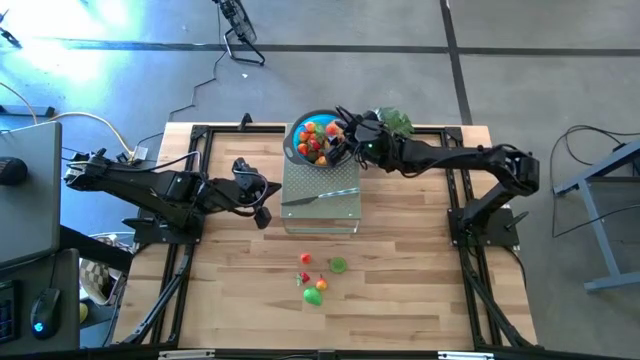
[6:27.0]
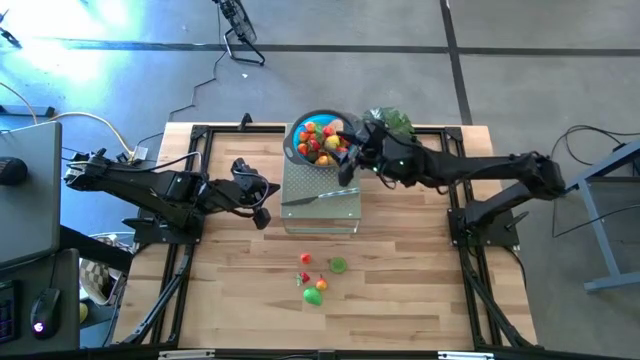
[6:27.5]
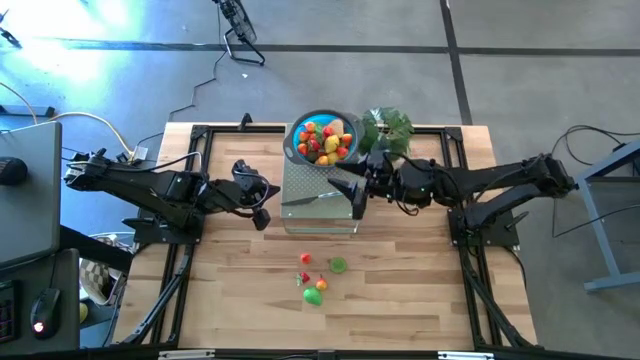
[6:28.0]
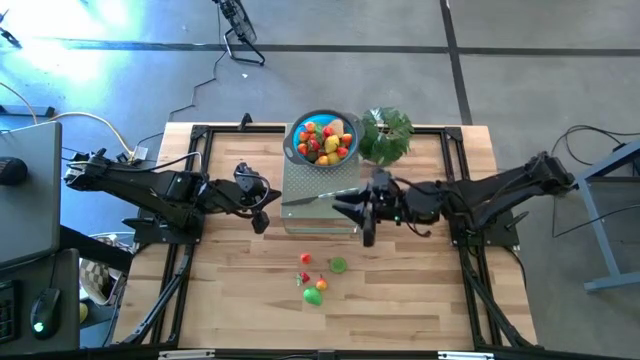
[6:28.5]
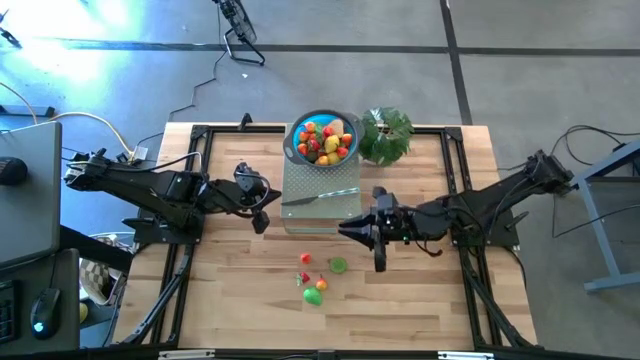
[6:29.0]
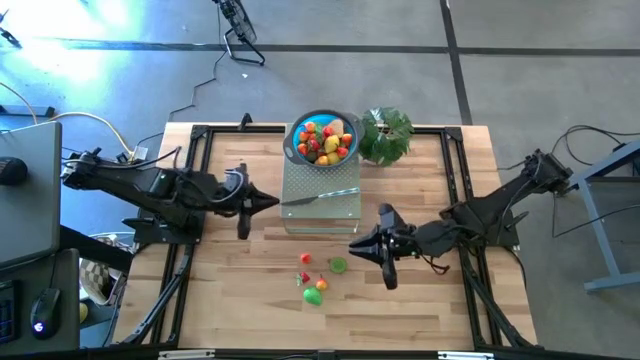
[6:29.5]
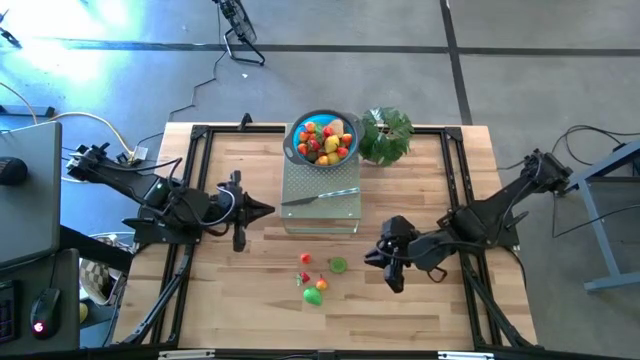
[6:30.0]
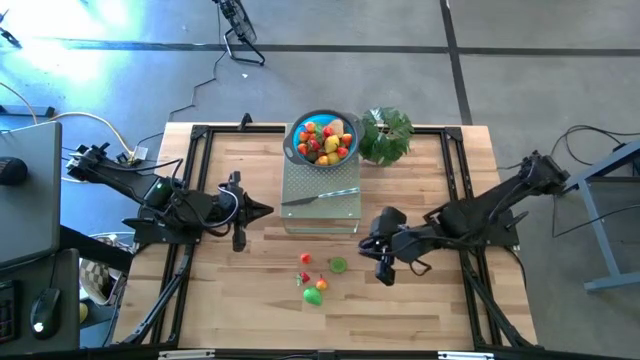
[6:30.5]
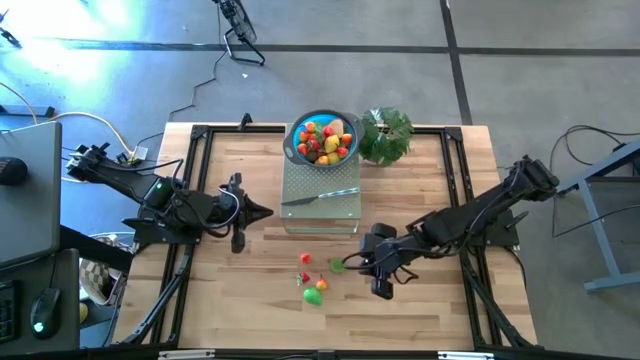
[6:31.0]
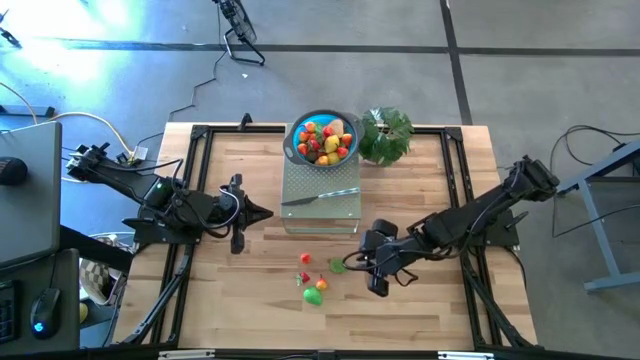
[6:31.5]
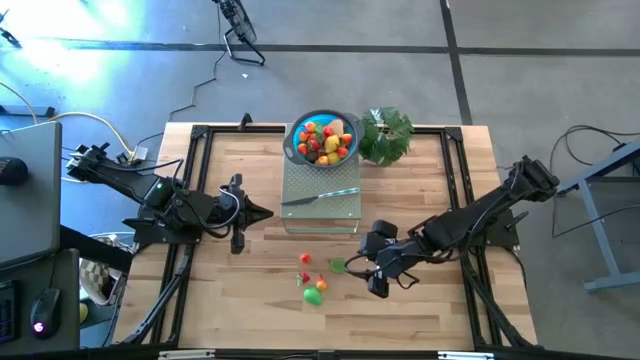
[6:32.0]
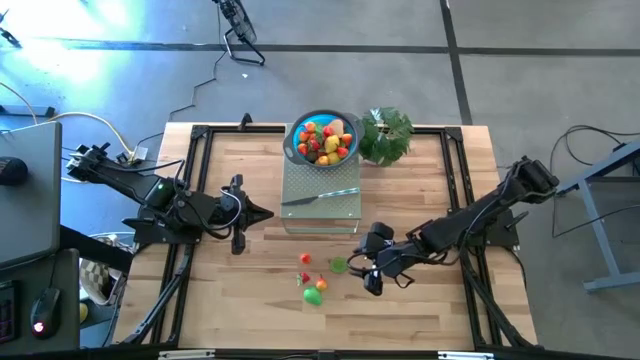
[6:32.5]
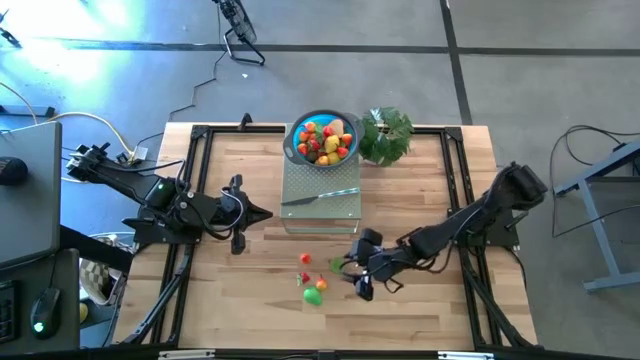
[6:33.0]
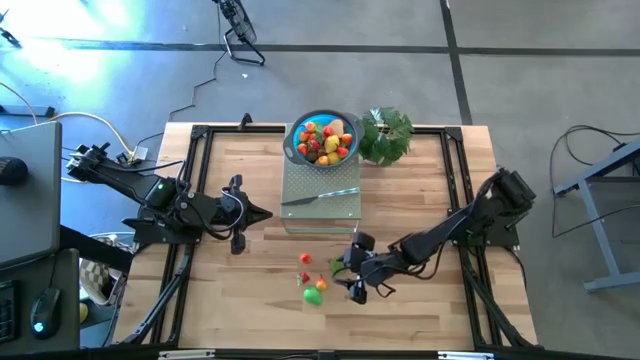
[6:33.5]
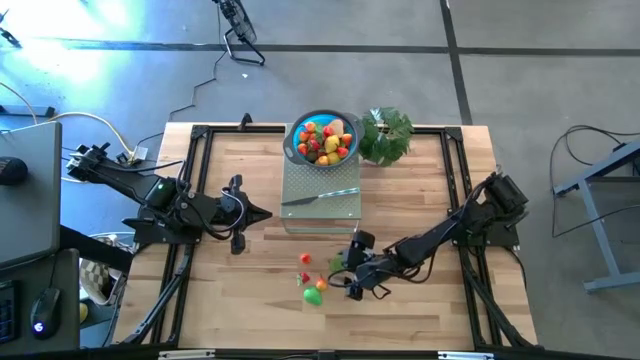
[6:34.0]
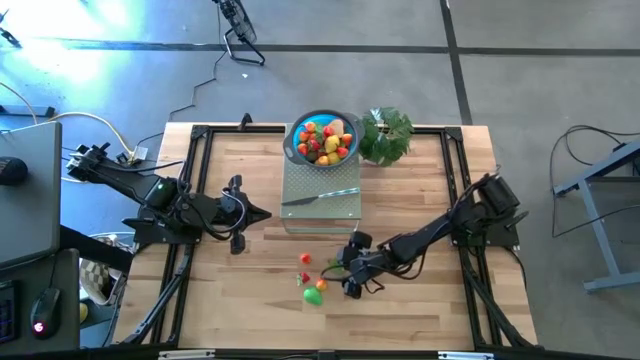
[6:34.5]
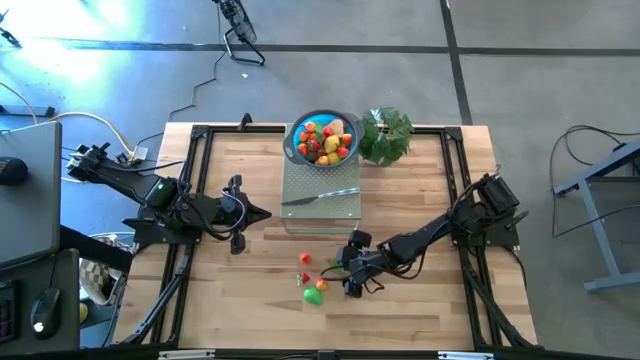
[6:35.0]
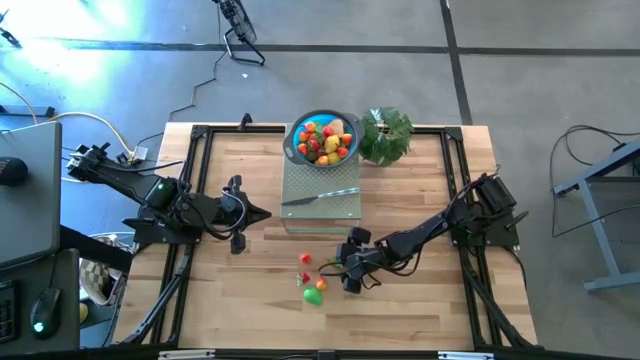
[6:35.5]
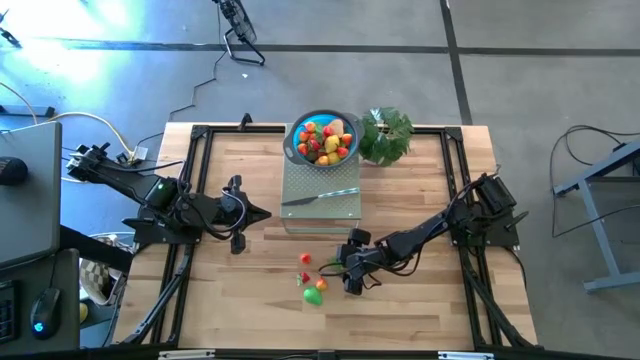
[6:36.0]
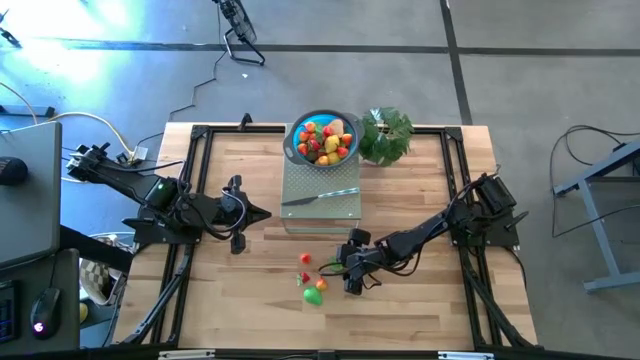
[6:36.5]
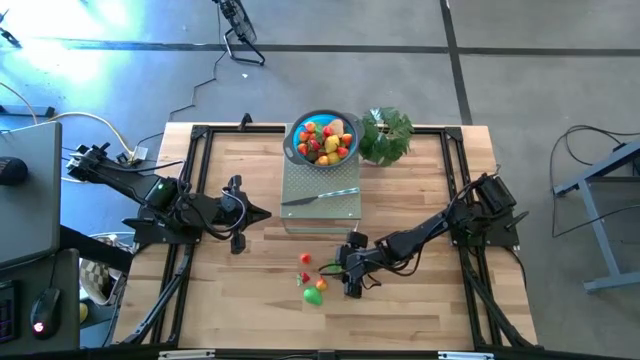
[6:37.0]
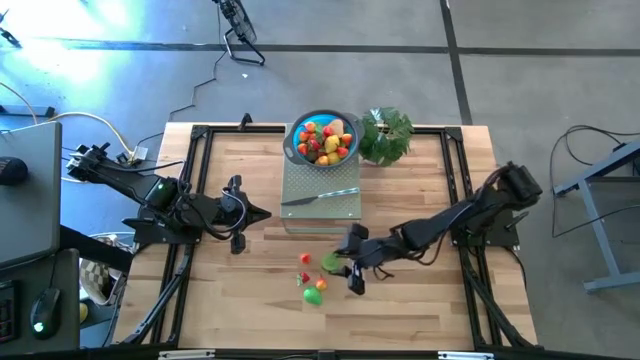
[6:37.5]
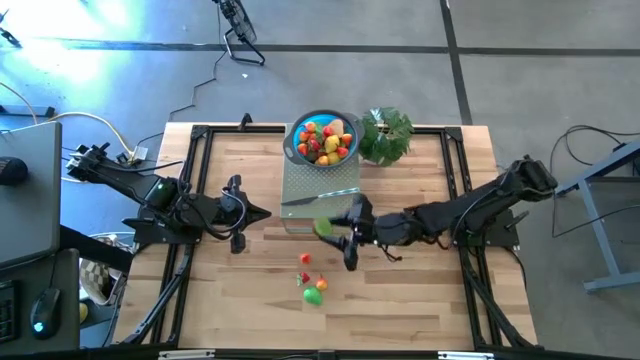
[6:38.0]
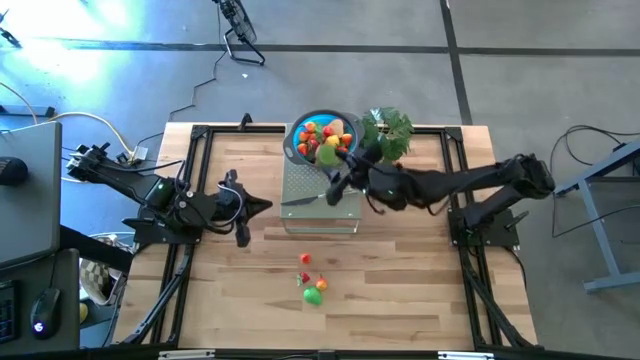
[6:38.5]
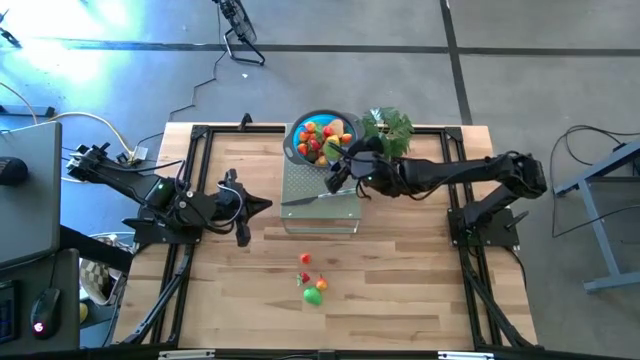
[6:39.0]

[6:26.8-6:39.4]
Task: Pick & Place Fruit
Put the brown kiwi in the blue bowl on the shelf

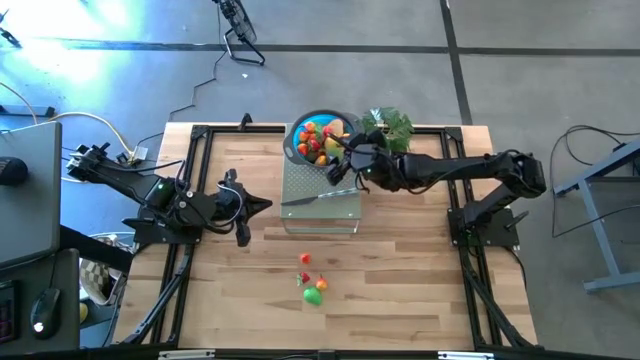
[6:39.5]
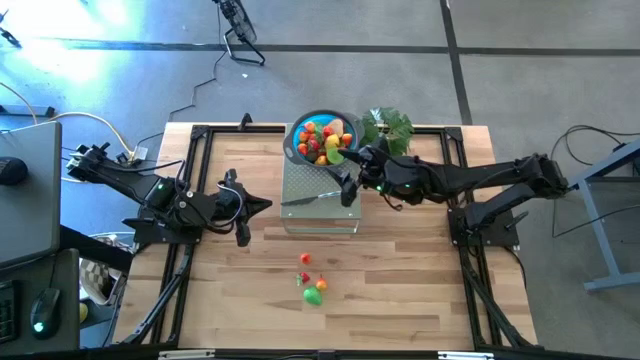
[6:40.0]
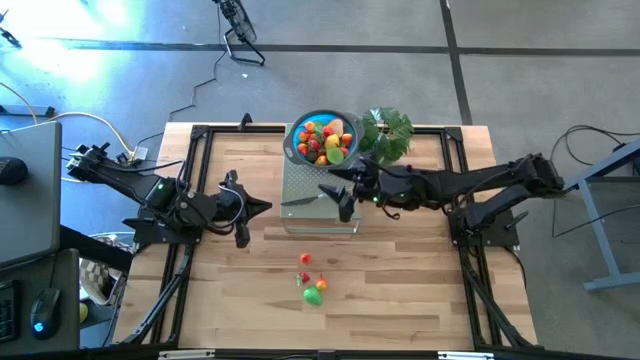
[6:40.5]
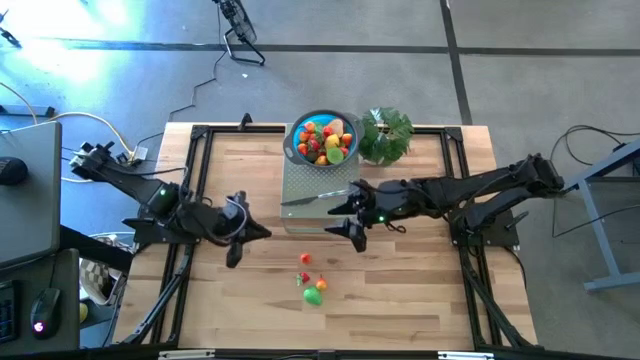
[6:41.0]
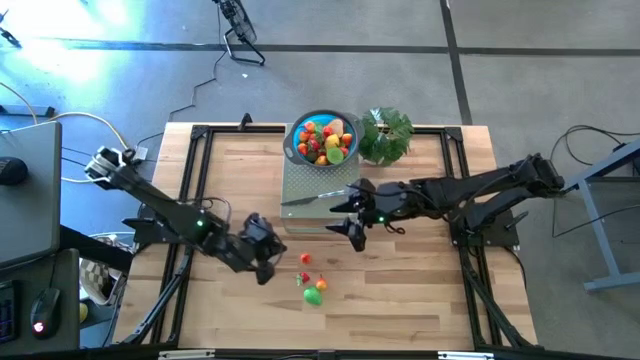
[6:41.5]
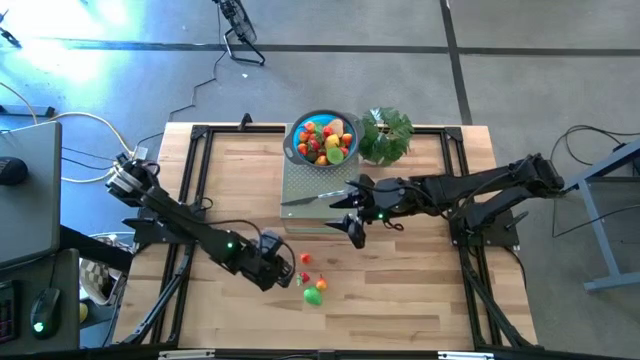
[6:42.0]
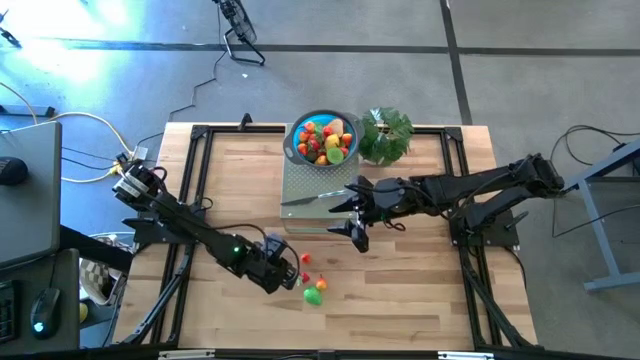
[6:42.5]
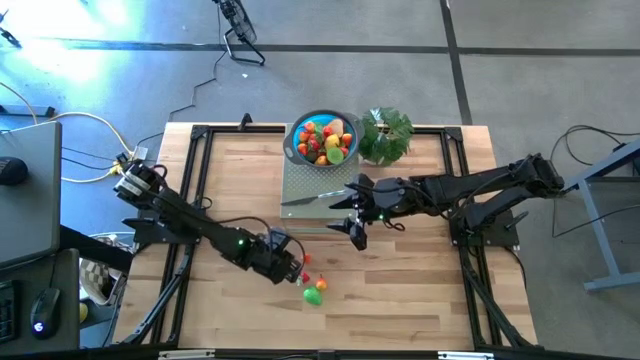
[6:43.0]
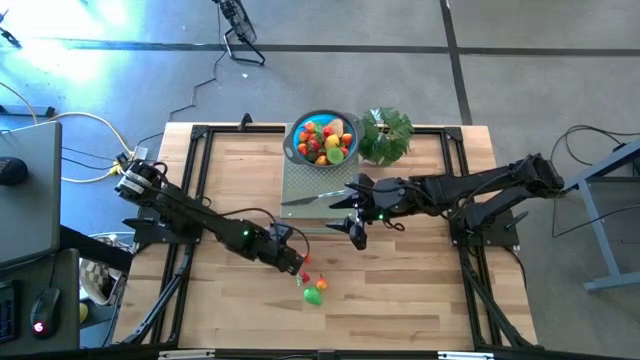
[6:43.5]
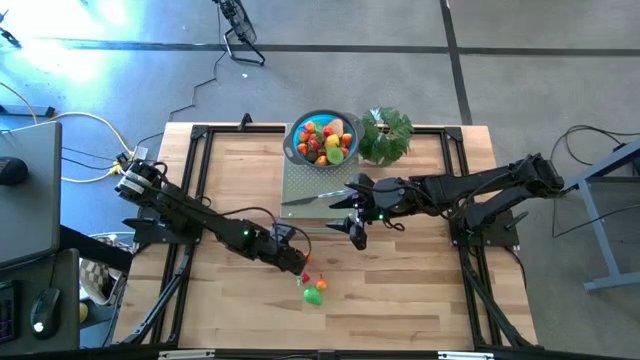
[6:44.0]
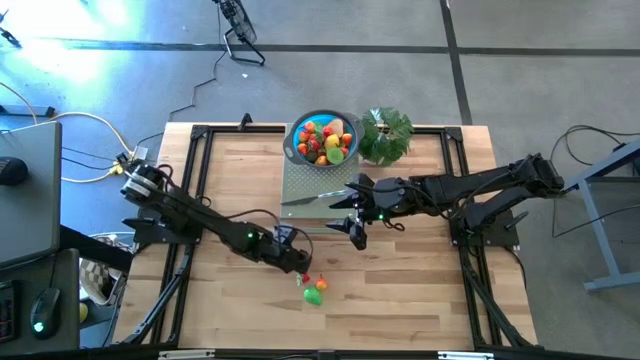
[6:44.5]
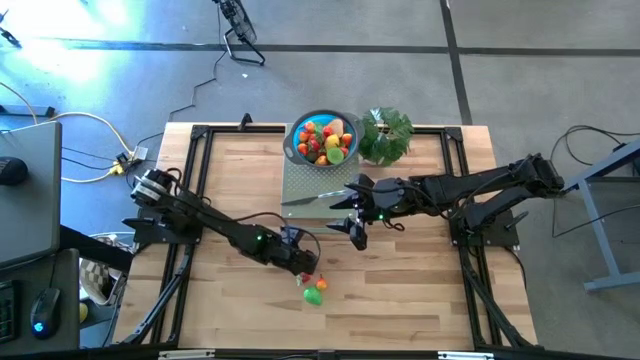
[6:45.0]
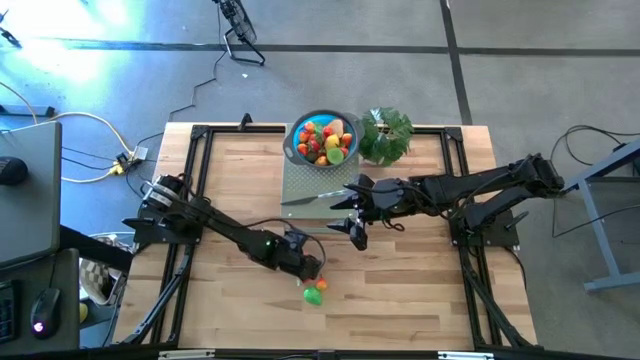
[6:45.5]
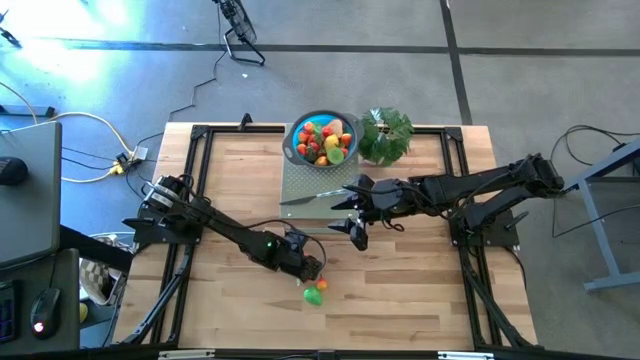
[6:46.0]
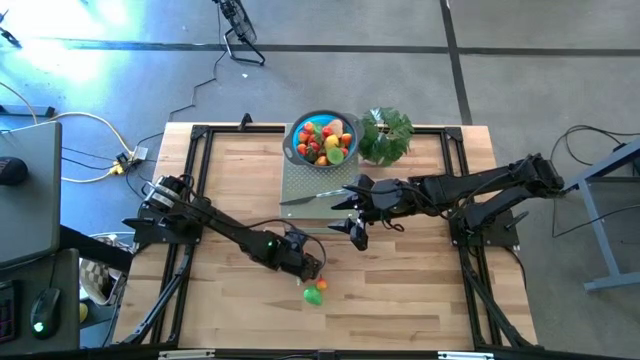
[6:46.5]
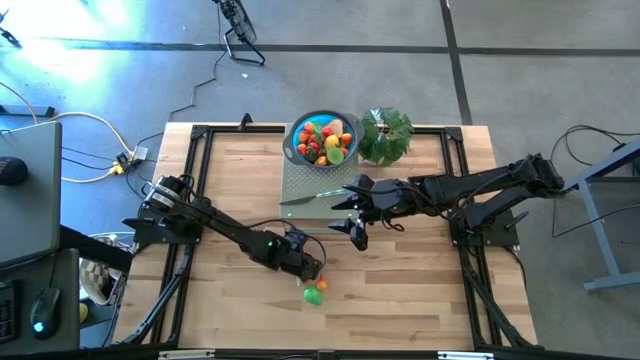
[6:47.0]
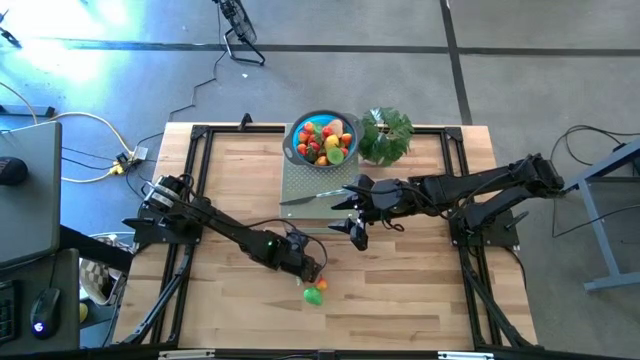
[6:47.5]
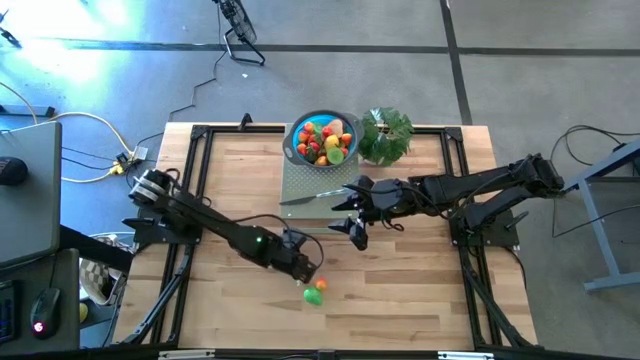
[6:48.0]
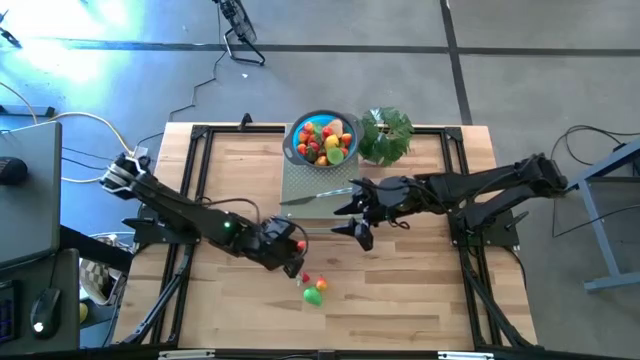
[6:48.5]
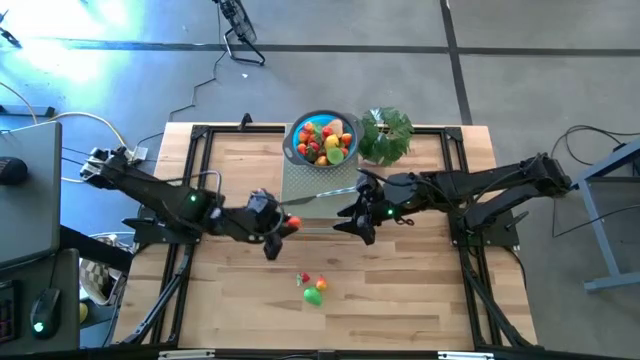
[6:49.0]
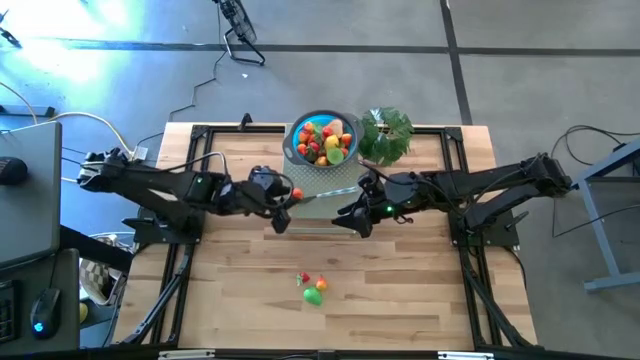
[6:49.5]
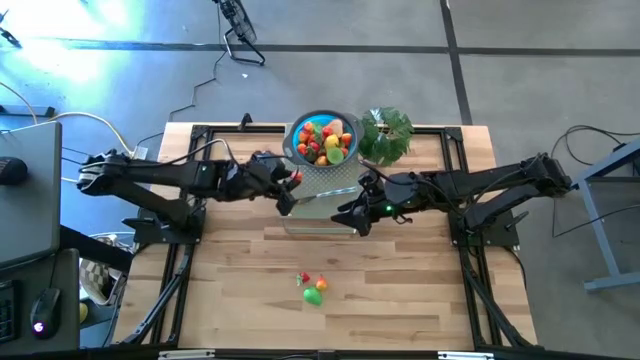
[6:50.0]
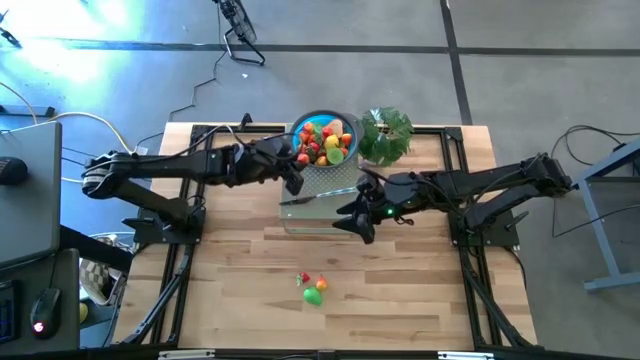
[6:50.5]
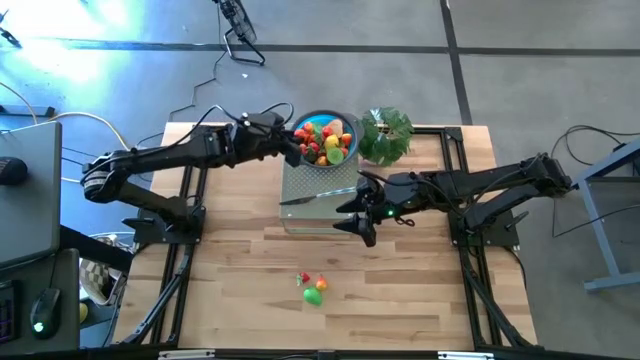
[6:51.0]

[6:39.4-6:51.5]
Put the orange peach in the blue bowl on the shelf
